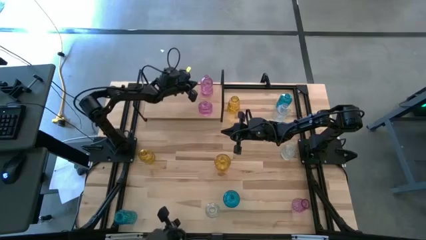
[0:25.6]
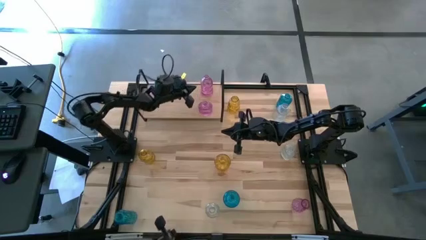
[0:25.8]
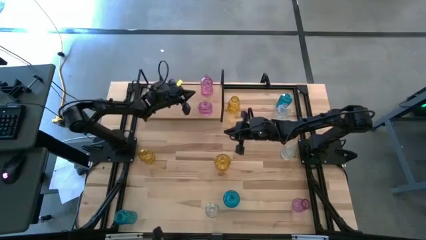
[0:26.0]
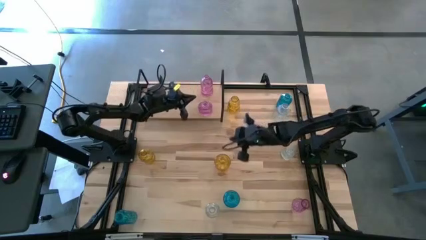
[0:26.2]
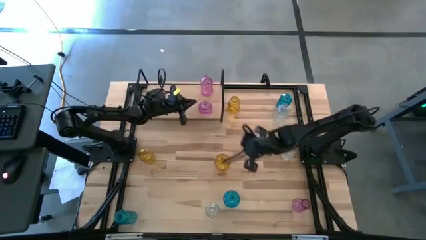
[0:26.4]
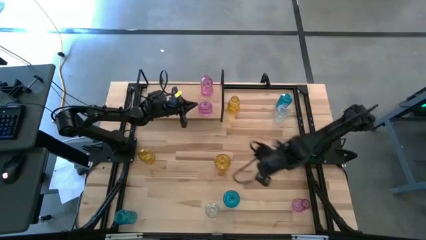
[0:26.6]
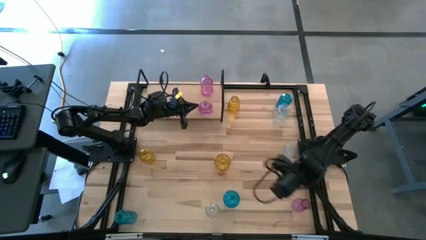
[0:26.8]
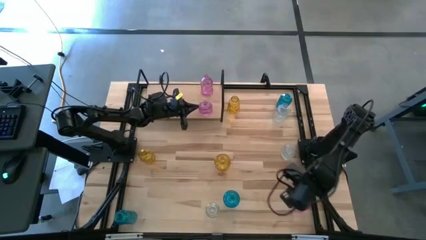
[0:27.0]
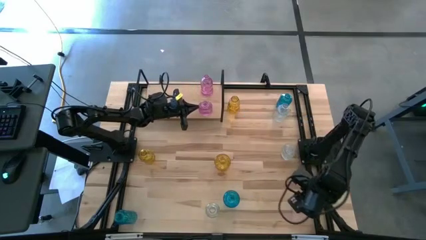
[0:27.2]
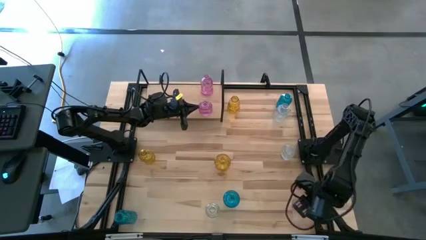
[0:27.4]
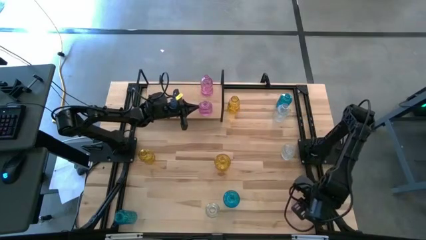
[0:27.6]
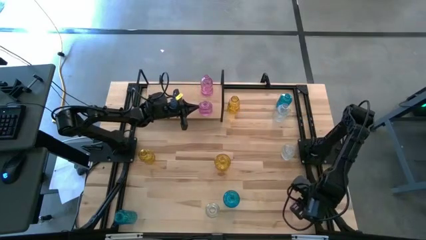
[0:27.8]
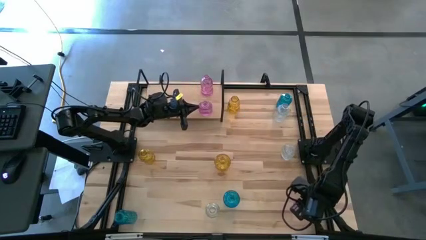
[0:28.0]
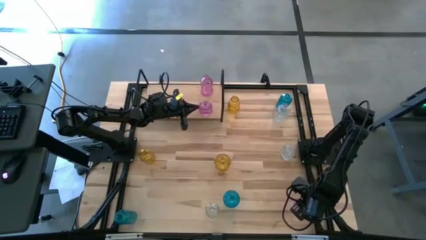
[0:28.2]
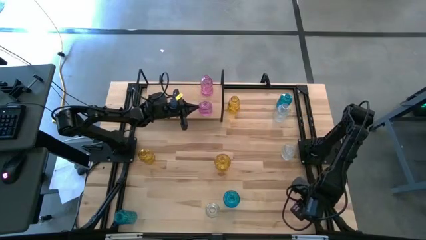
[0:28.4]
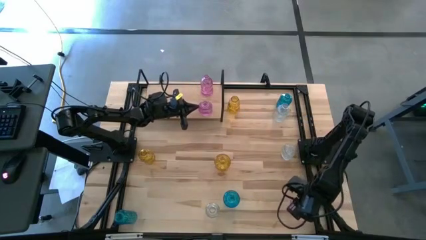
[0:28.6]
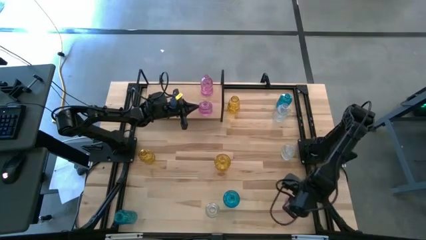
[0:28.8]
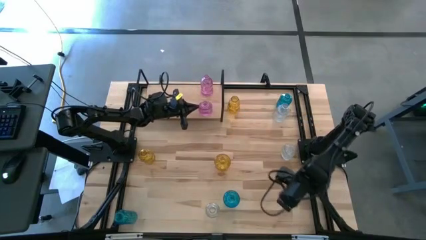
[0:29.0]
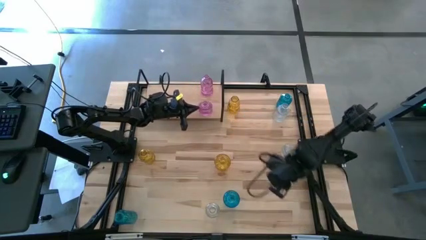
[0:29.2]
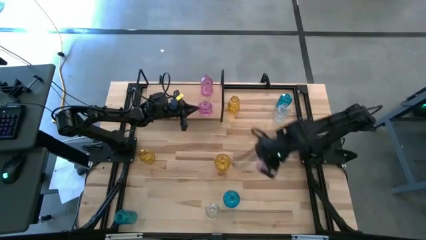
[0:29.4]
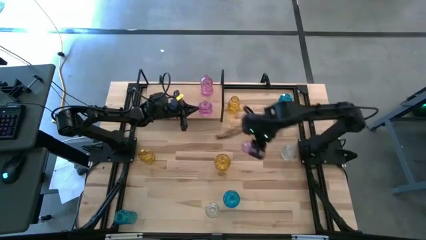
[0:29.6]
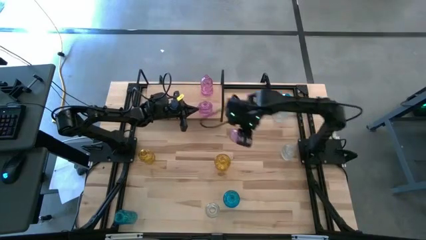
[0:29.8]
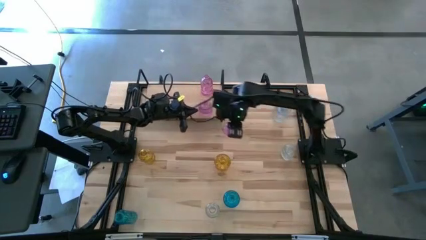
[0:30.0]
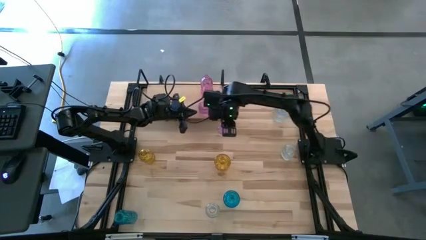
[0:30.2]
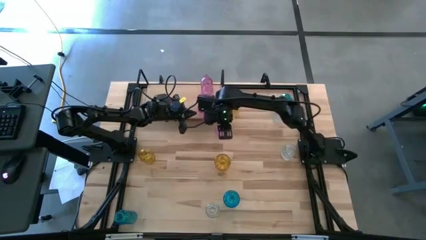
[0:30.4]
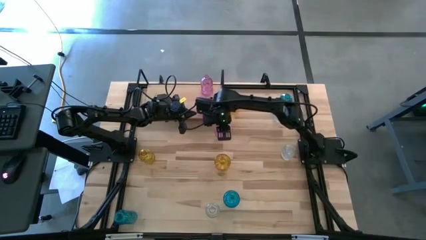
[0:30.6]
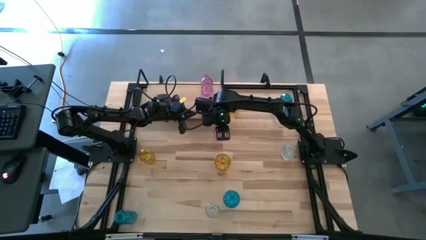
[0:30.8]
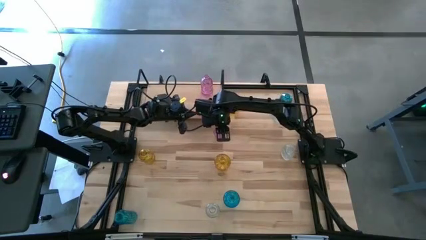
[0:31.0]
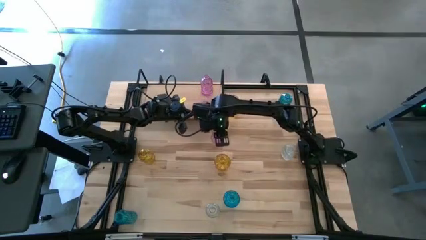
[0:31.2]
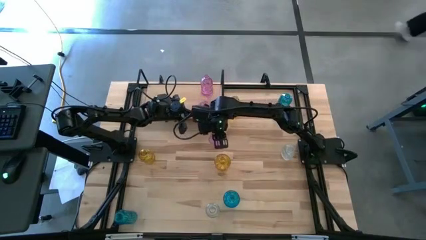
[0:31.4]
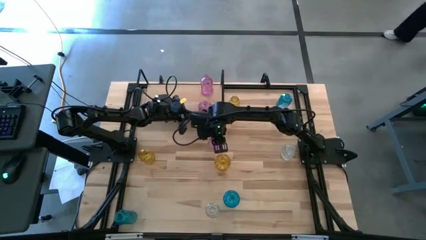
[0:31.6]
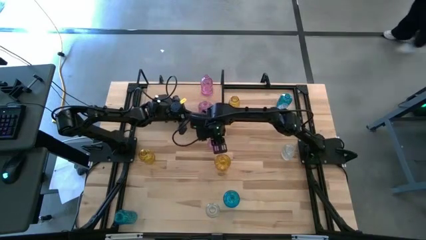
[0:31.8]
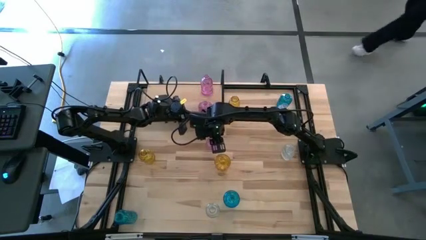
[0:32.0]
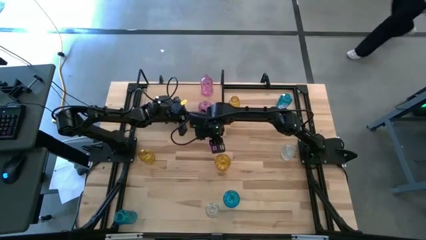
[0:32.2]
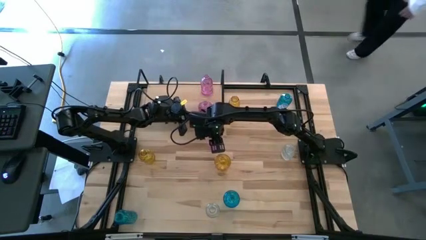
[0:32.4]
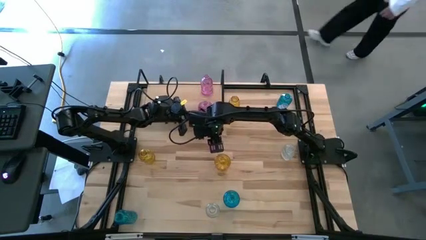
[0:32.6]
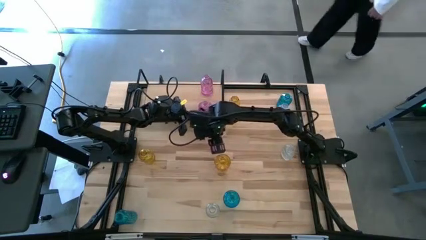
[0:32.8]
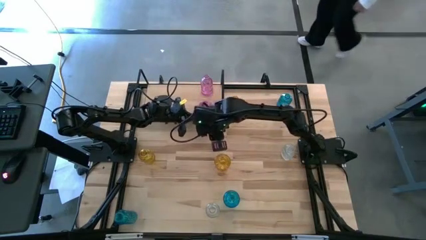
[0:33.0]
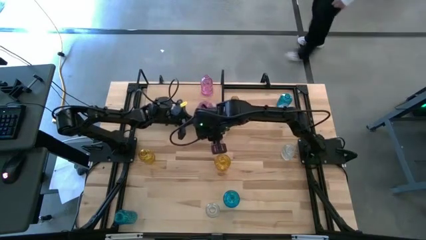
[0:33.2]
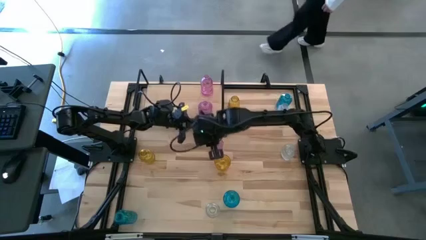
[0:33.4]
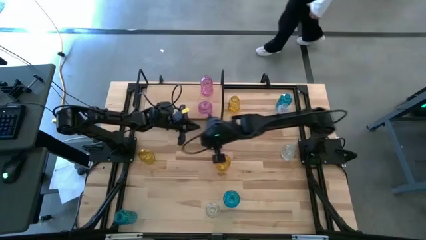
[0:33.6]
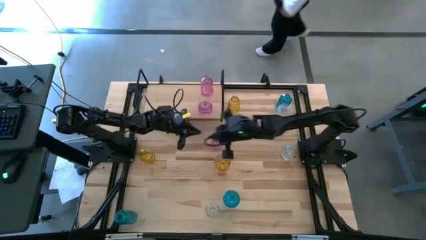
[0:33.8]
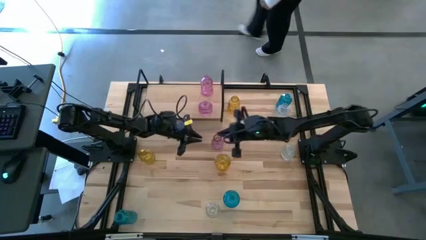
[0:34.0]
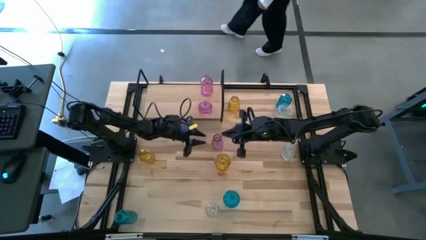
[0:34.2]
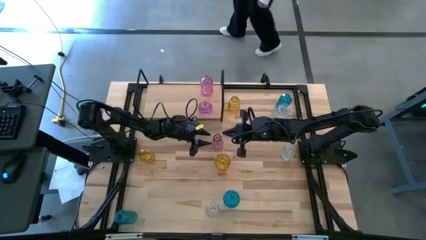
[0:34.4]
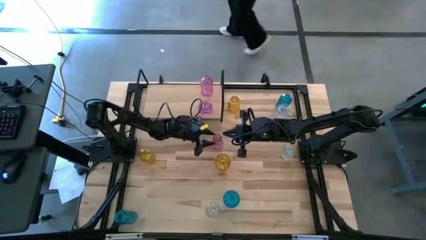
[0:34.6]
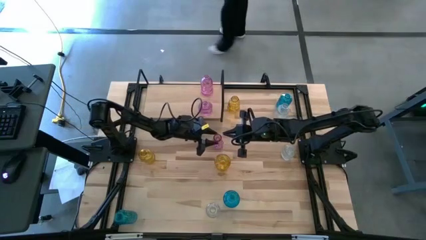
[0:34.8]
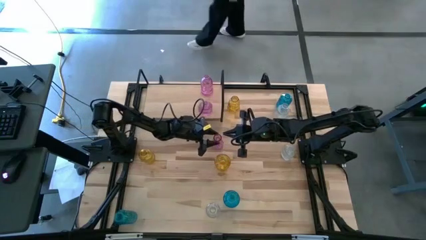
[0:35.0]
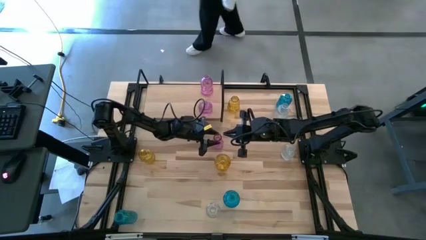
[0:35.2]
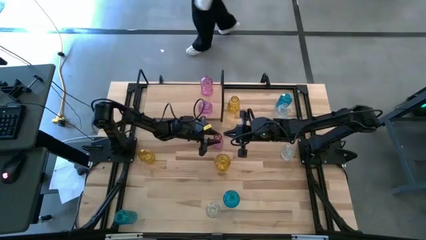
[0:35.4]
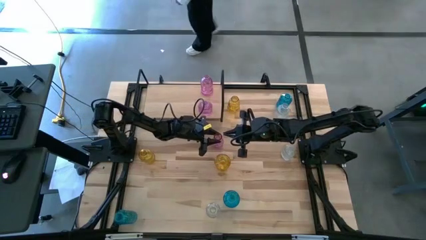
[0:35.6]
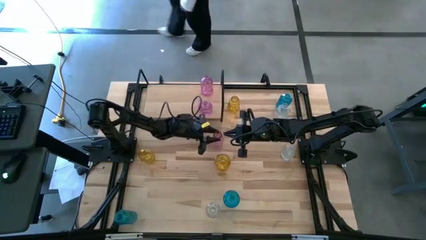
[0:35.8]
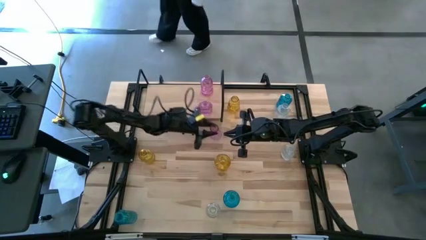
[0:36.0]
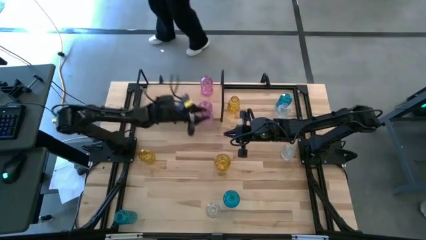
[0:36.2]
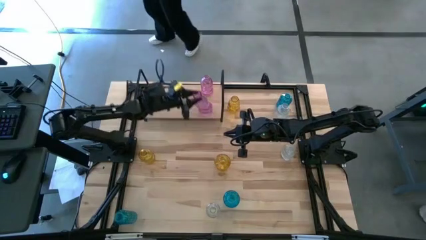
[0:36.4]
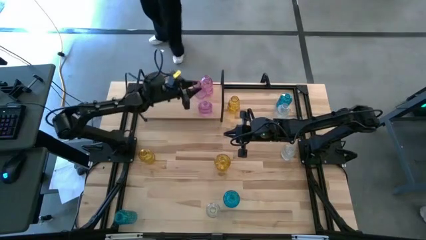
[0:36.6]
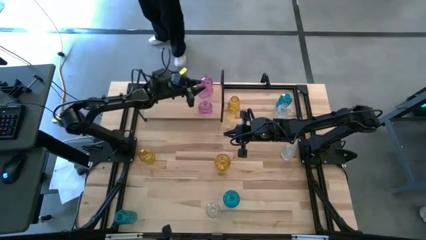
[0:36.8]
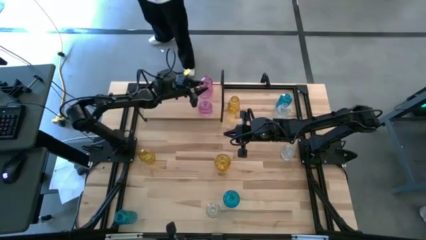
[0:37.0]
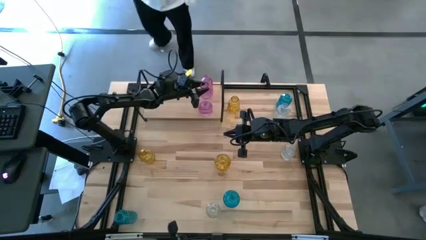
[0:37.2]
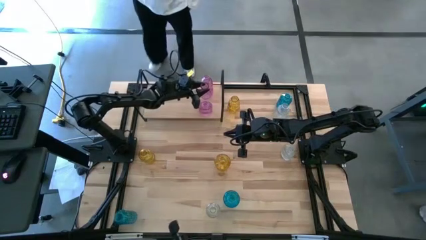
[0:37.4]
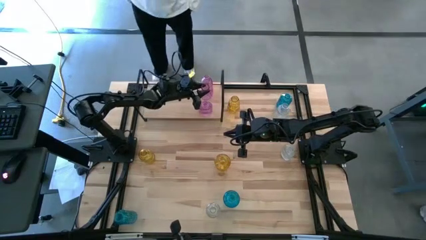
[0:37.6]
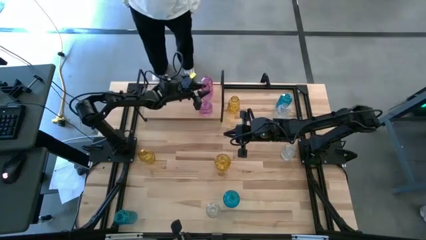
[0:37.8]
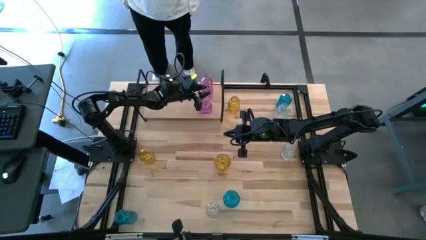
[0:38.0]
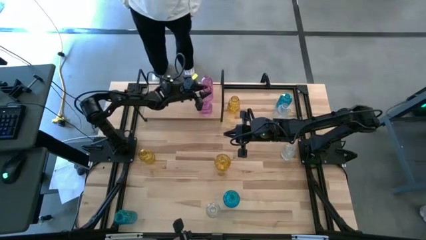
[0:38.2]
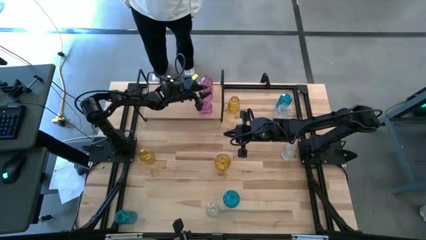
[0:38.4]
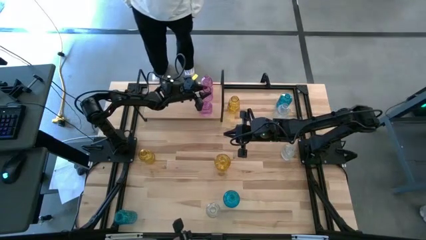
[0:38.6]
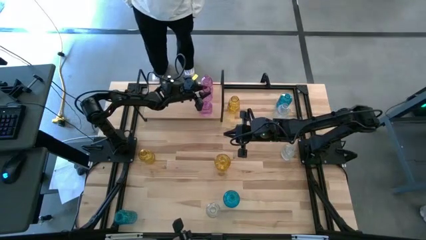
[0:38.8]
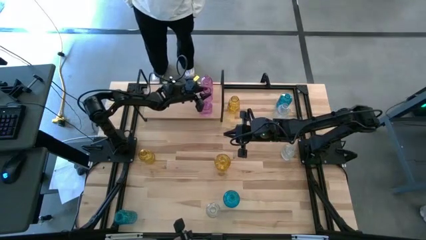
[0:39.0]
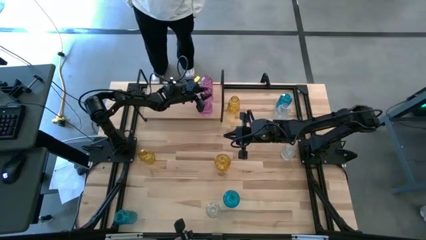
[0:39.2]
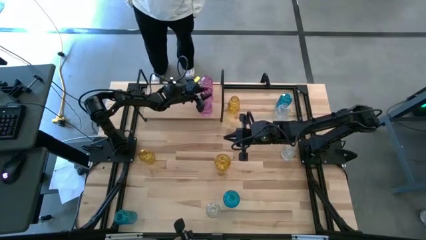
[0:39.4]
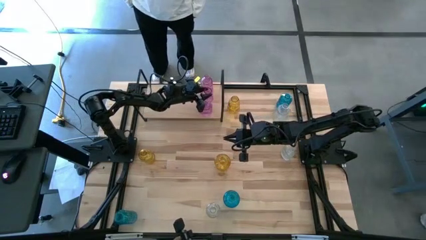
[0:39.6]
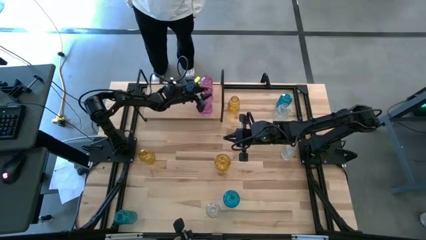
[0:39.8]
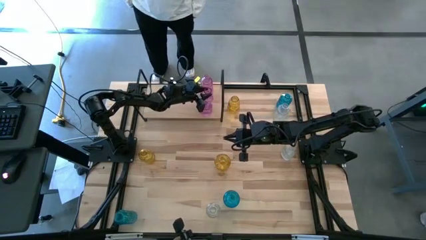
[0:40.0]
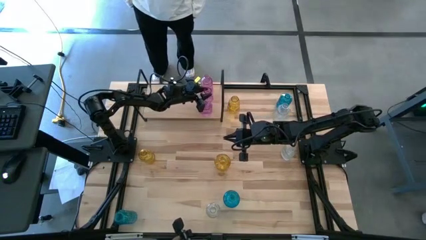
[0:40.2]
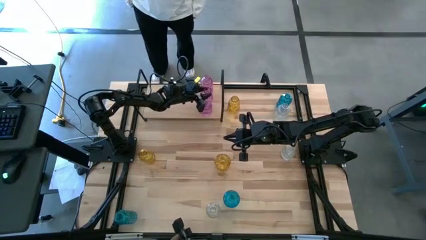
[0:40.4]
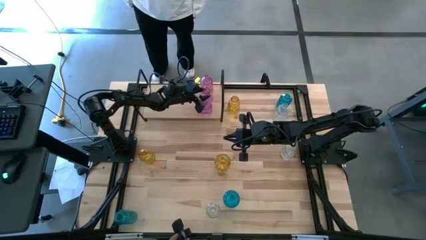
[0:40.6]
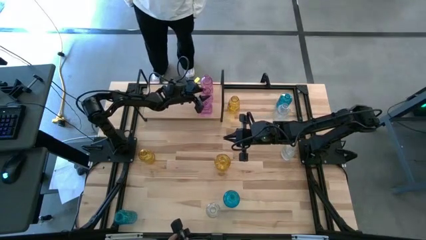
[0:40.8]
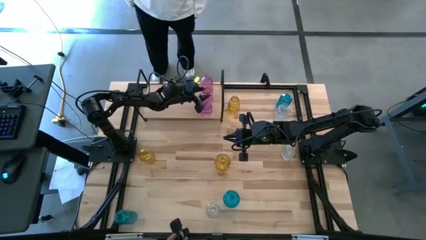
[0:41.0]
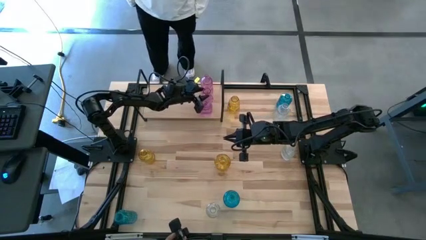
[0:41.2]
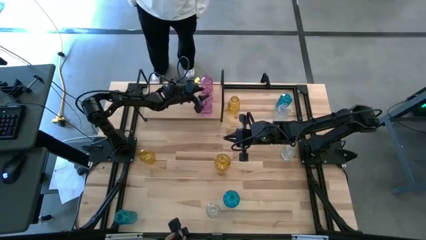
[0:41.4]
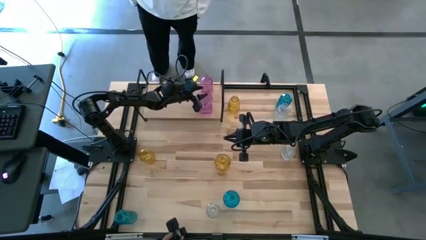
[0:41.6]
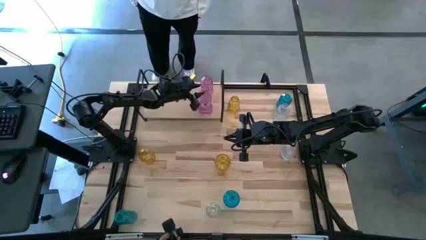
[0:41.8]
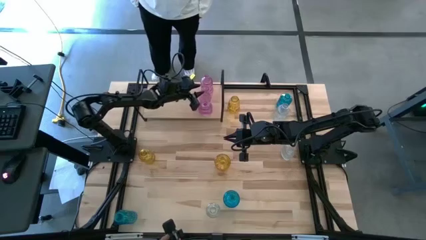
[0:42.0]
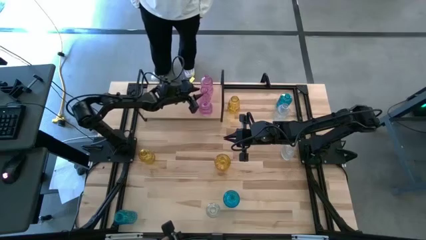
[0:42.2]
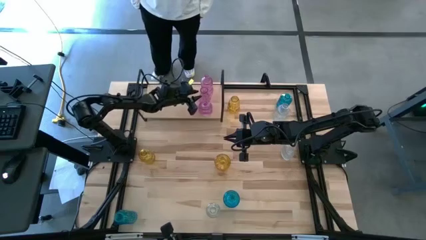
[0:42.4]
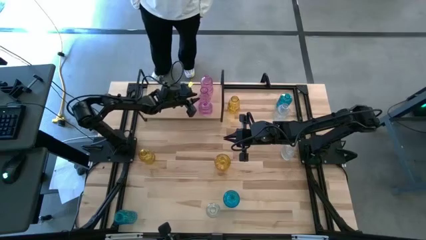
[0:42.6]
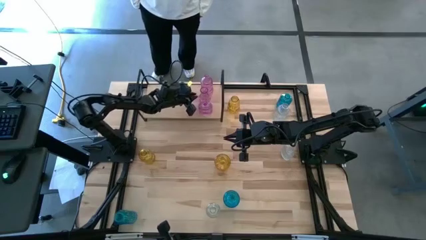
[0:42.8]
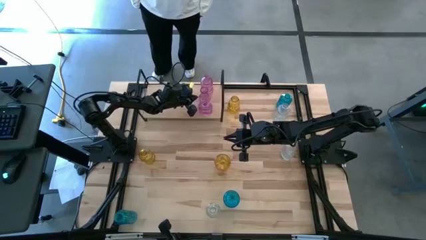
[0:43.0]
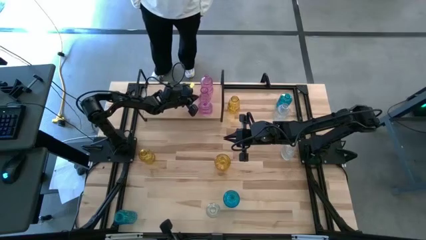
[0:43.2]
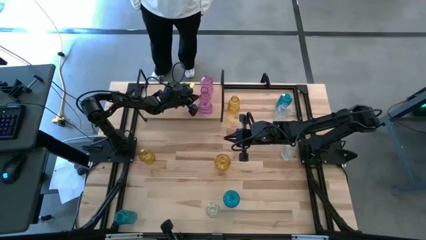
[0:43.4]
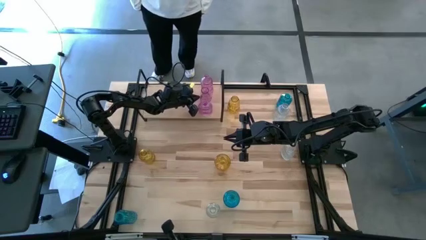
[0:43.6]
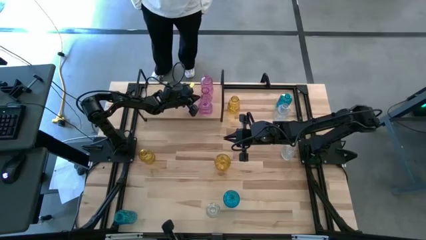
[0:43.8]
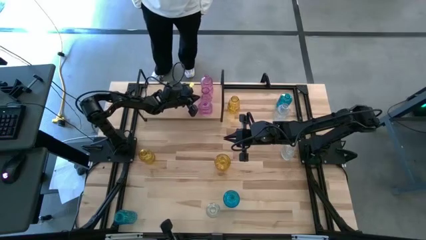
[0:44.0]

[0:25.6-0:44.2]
Task: sort vases onto shelf
Put the pink vase on the shelf
